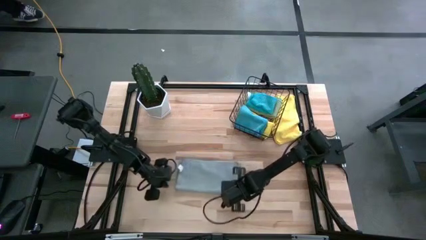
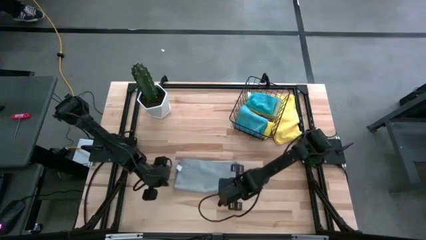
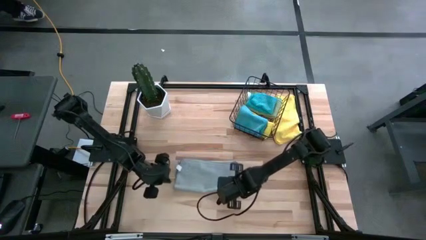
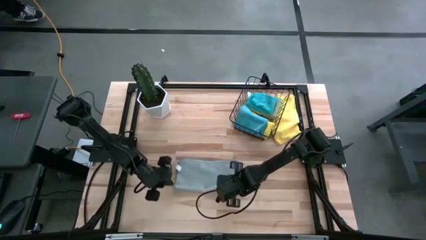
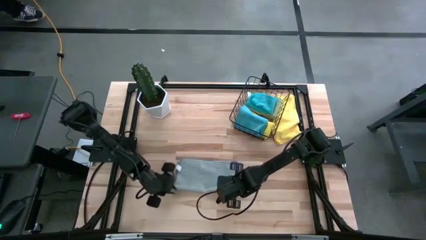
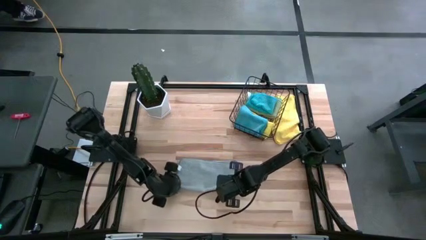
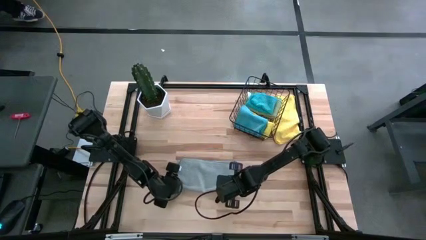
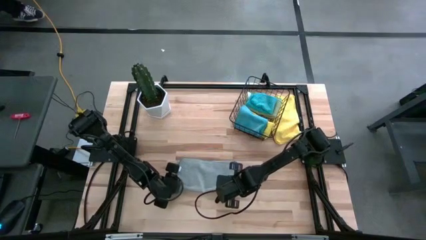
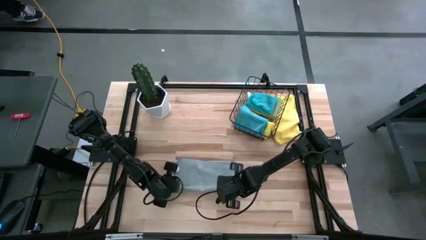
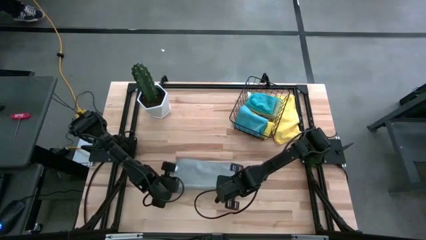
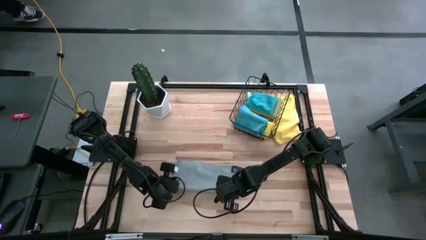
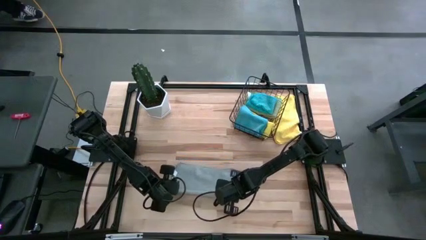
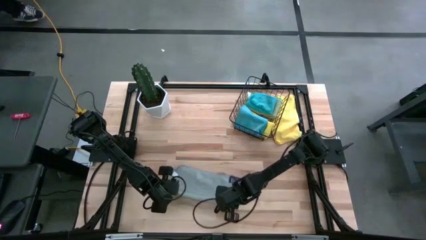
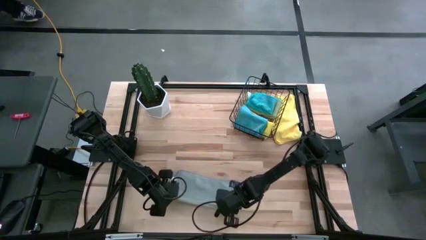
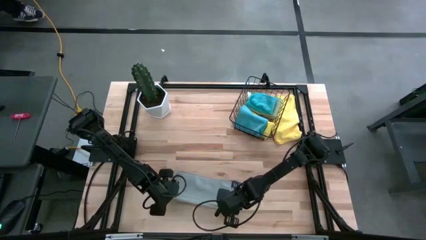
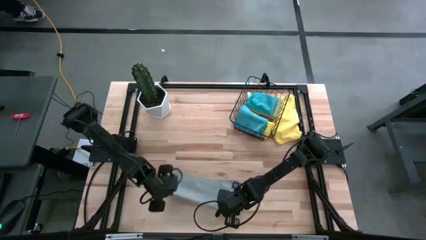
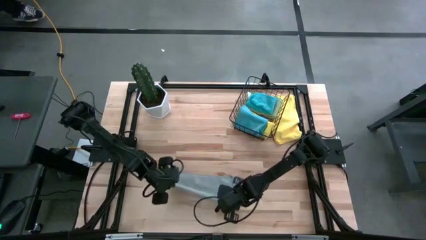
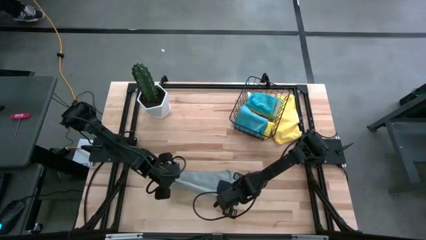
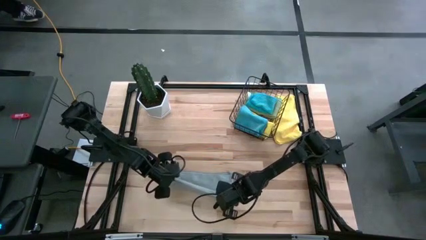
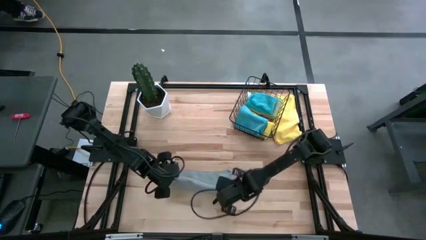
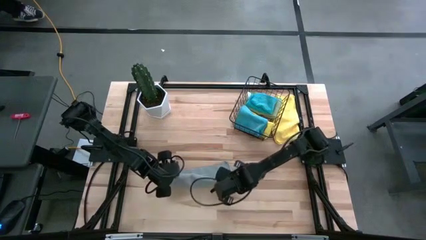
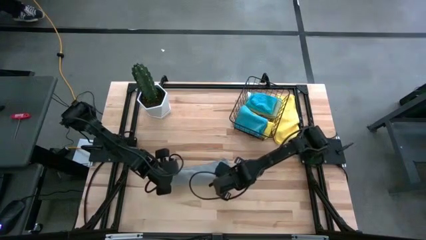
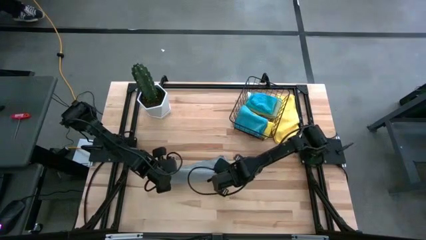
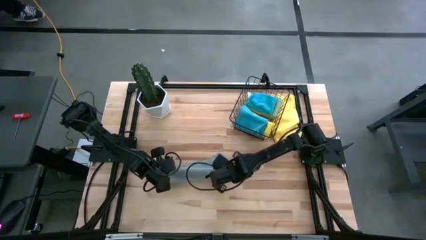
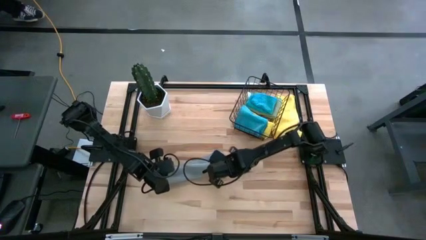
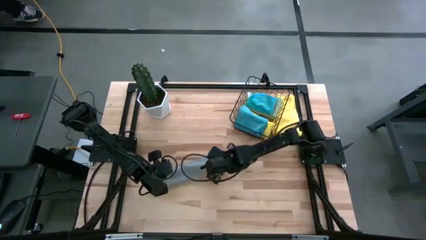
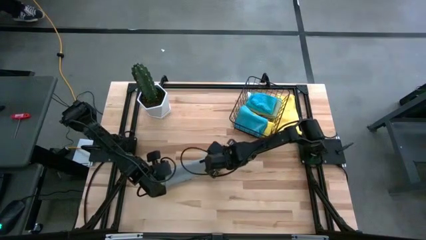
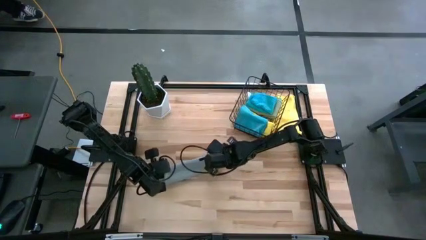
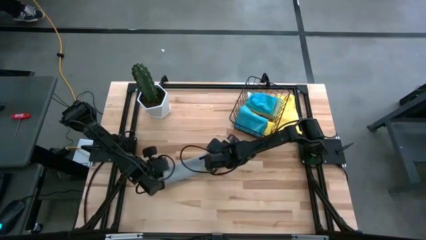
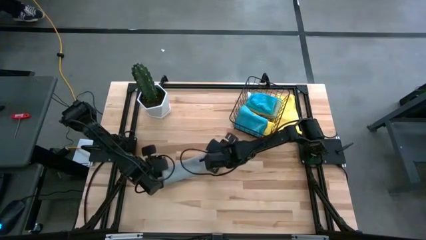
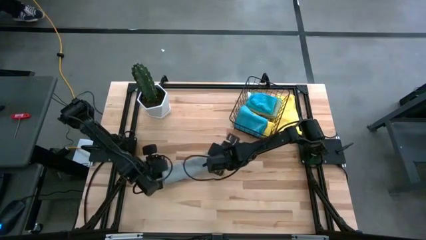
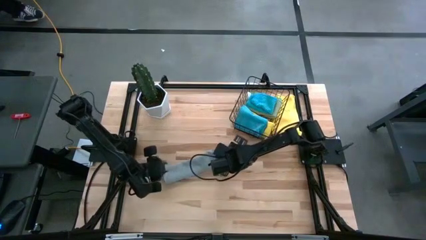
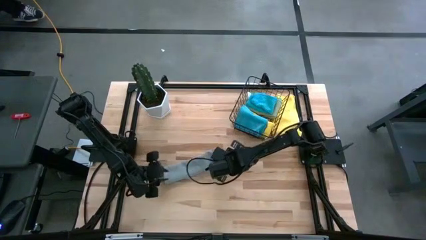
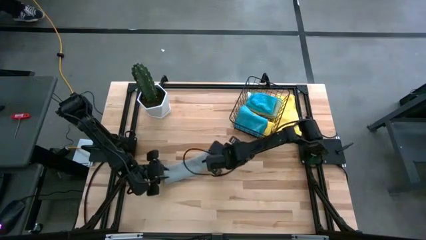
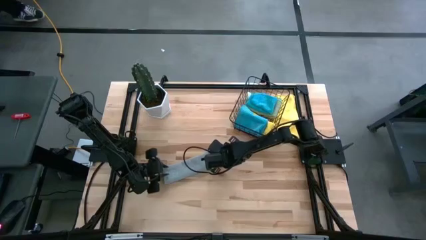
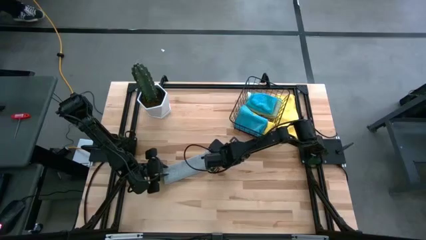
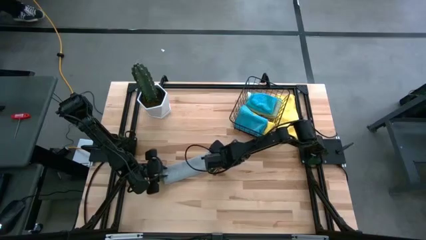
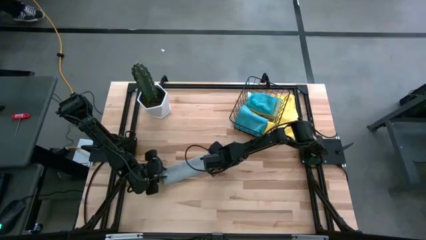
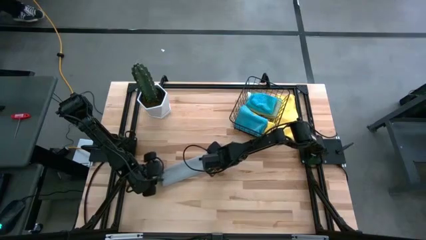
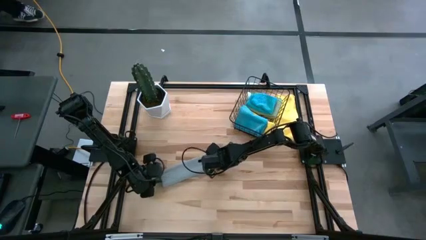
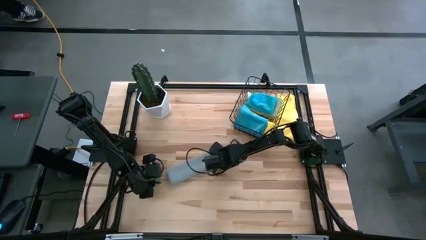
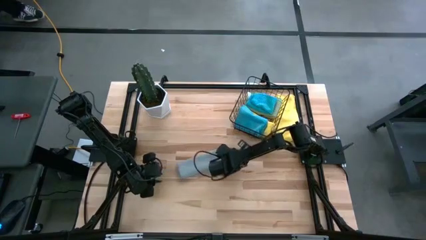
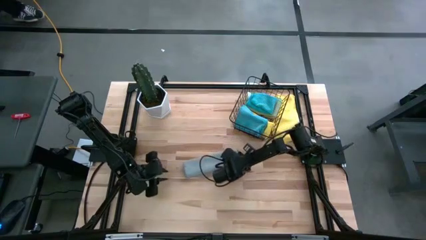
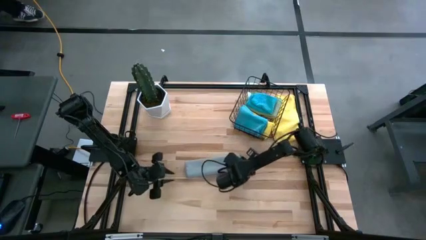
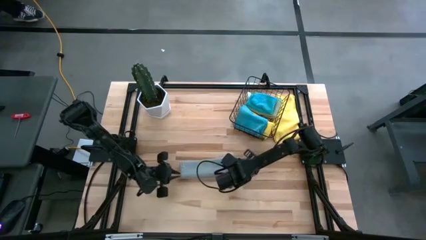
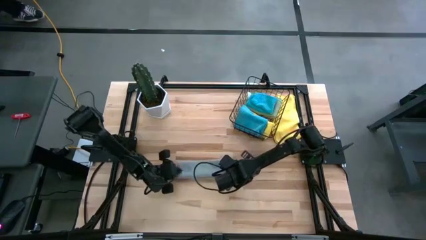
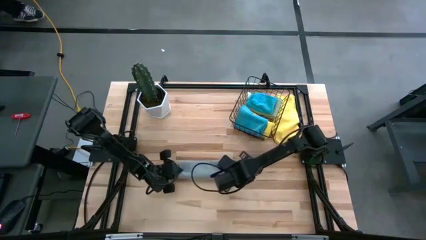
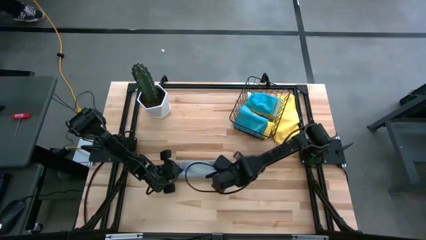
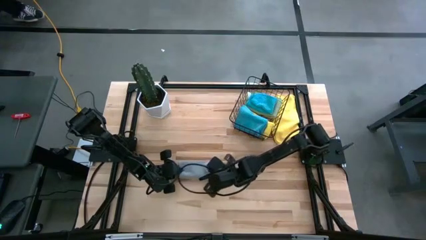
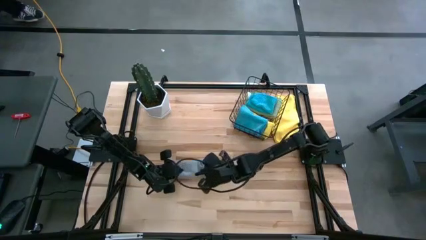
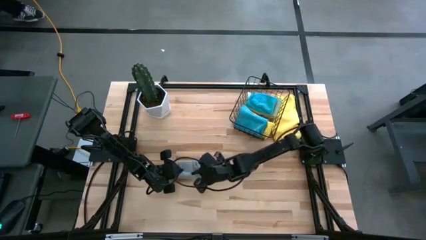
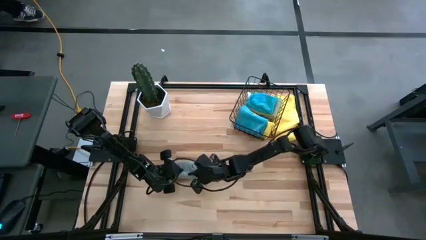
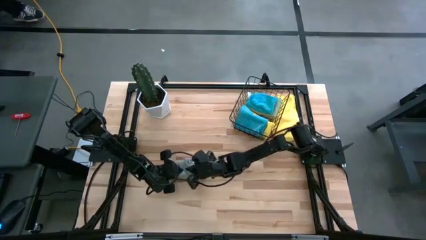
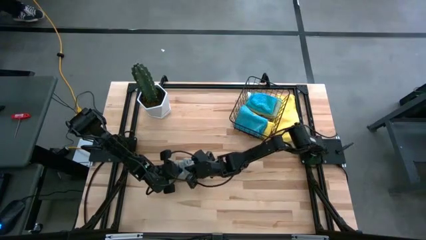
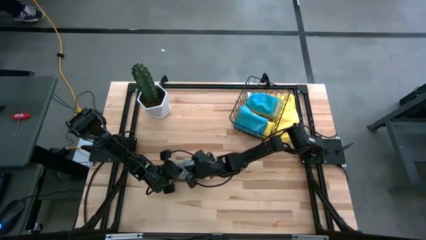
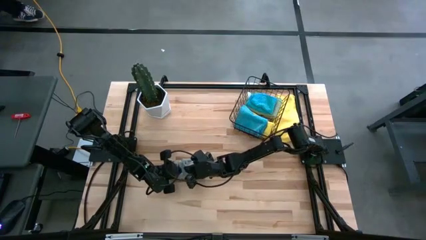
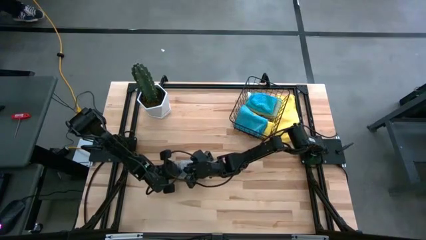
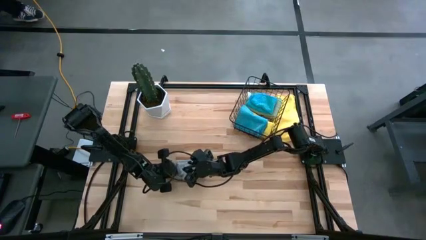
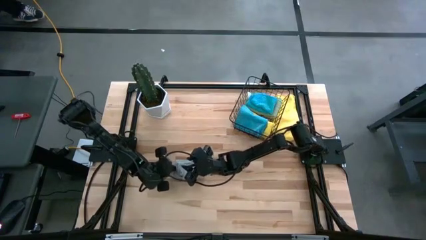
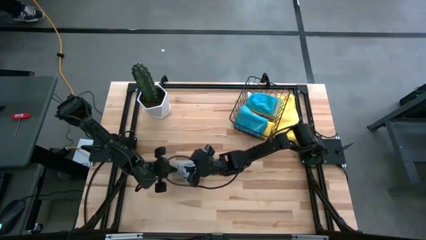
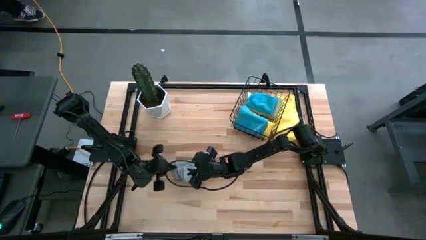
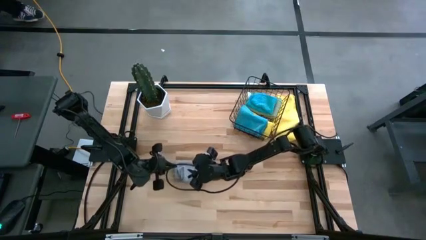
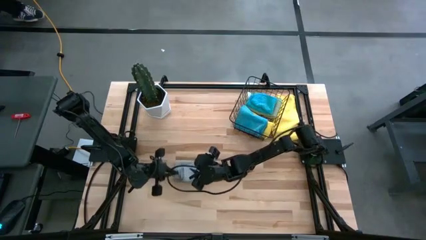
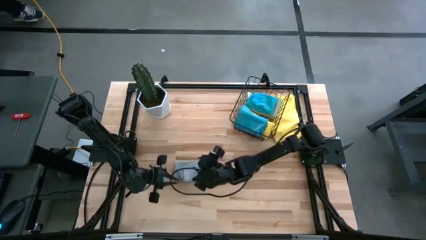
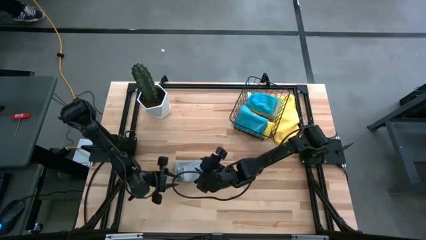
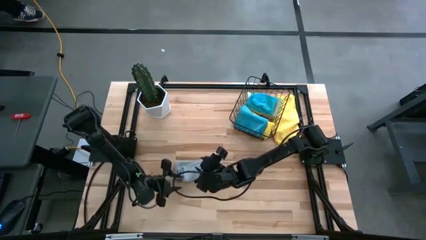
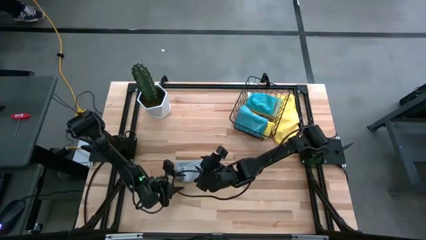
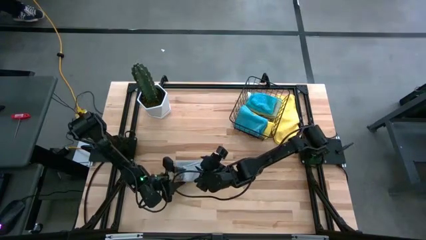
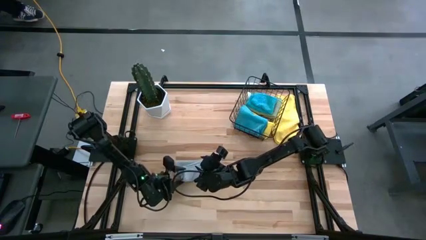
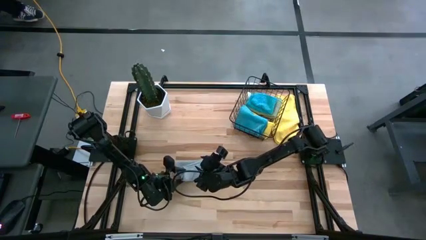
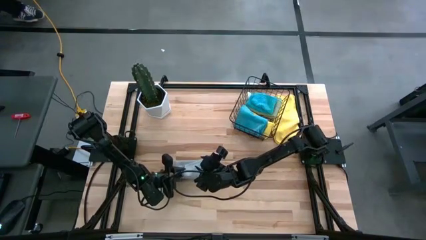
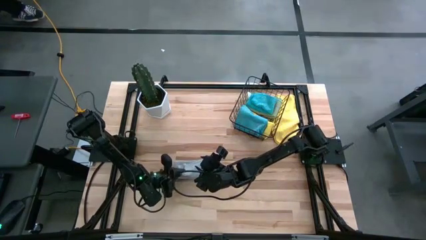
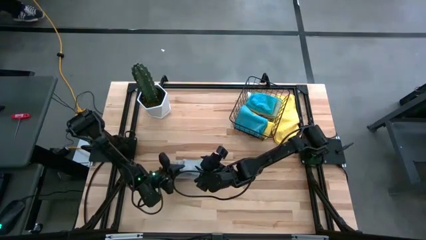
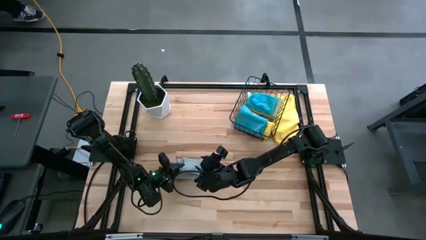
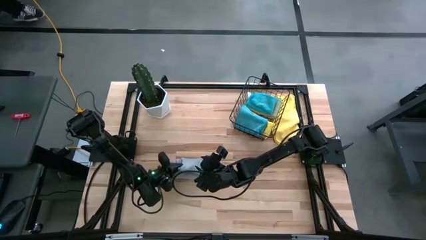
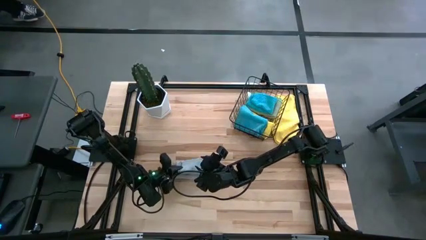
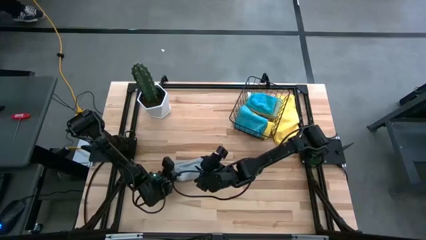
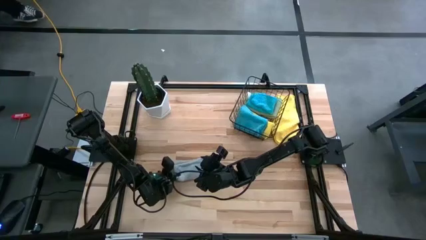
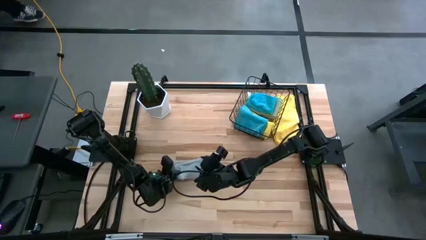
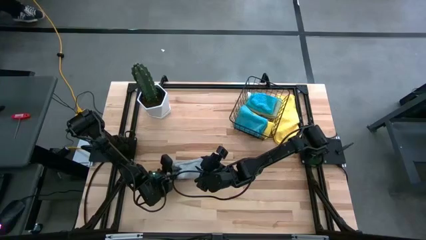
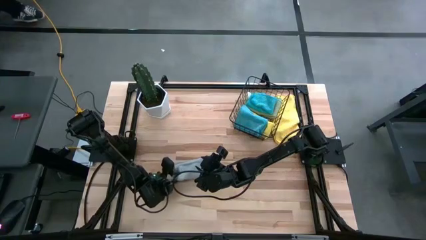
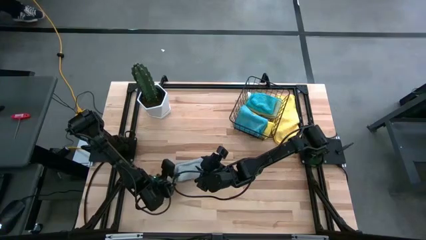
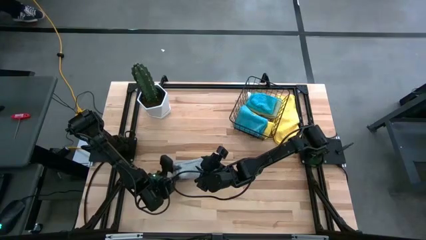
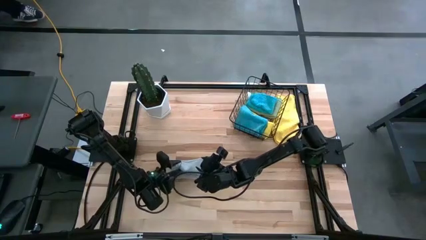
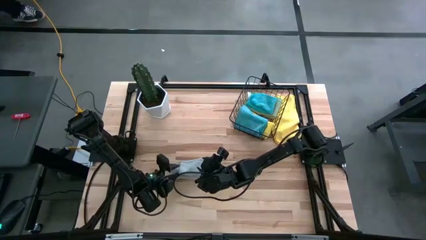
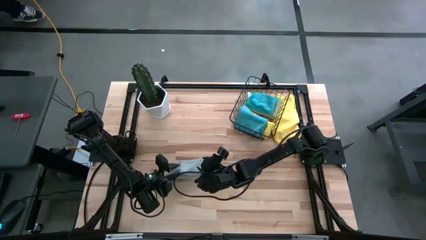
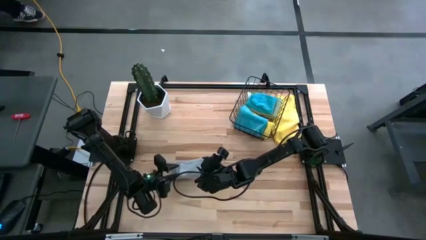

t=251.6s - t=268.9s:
Task: Fold microfiber towels
Fold the gray microfiber towel
